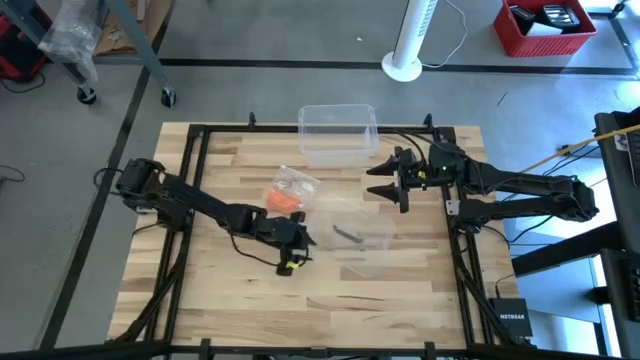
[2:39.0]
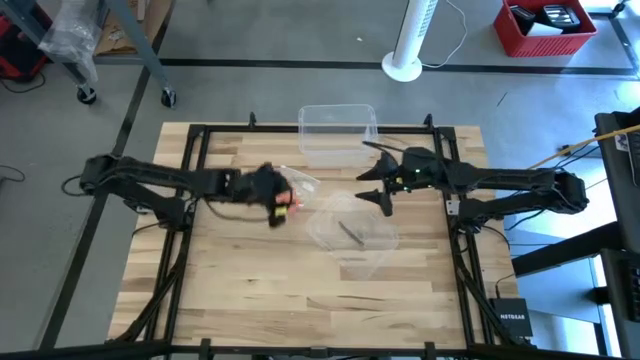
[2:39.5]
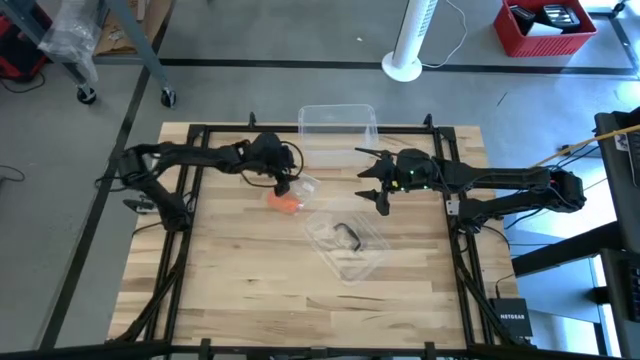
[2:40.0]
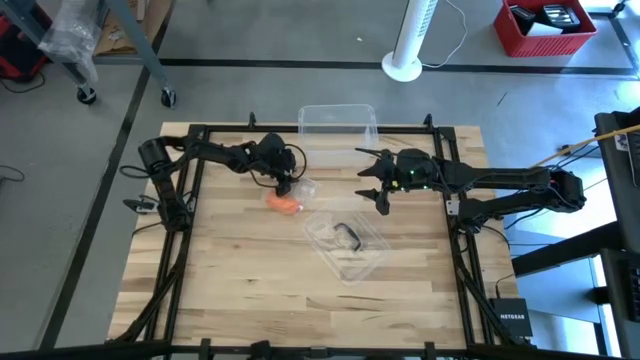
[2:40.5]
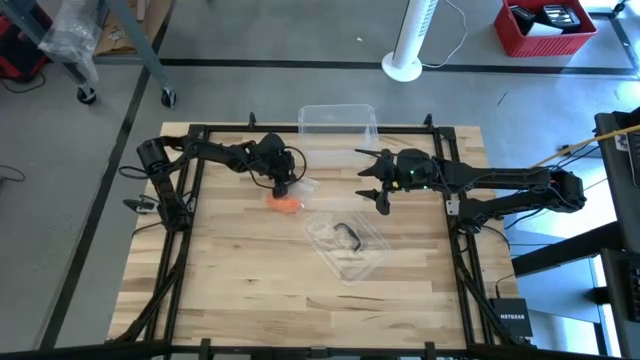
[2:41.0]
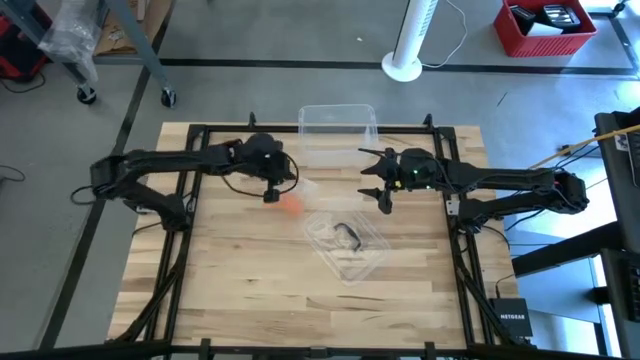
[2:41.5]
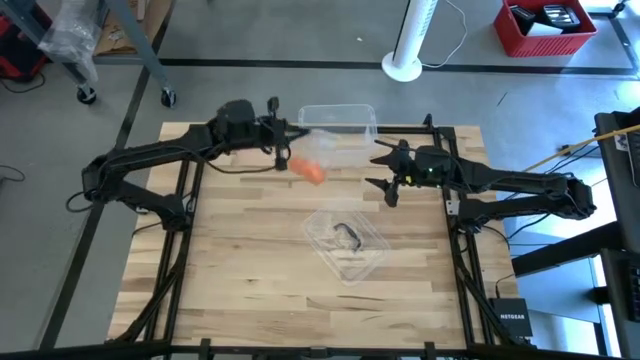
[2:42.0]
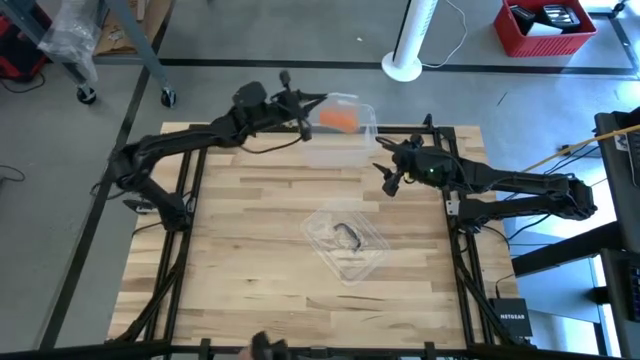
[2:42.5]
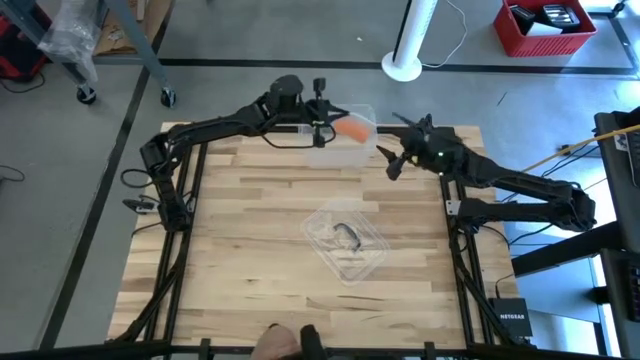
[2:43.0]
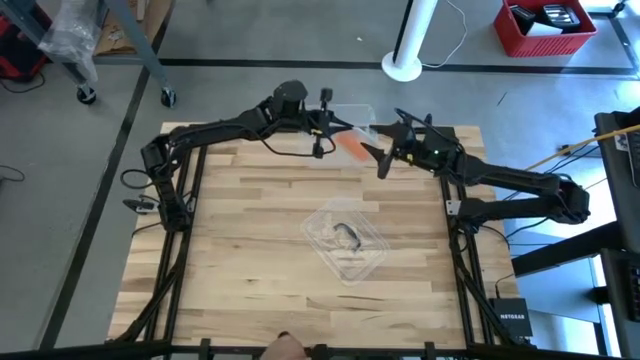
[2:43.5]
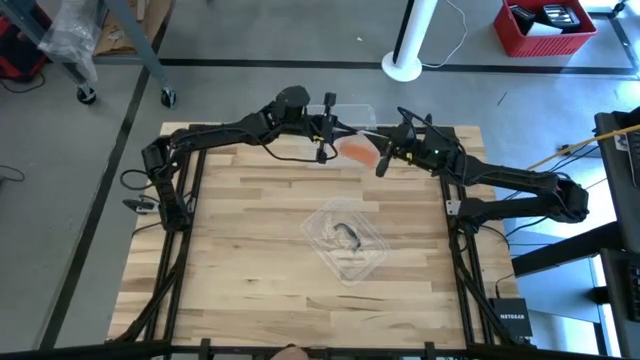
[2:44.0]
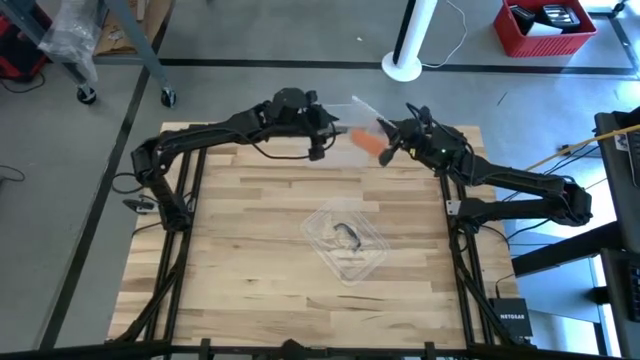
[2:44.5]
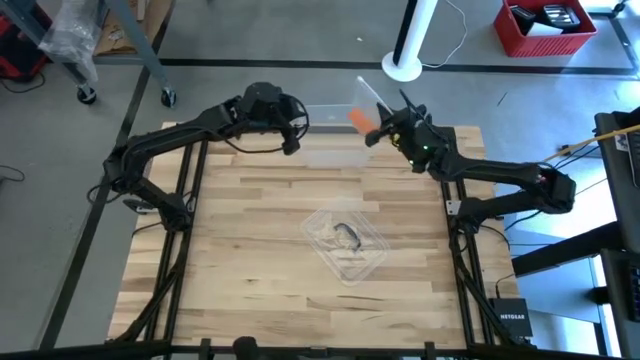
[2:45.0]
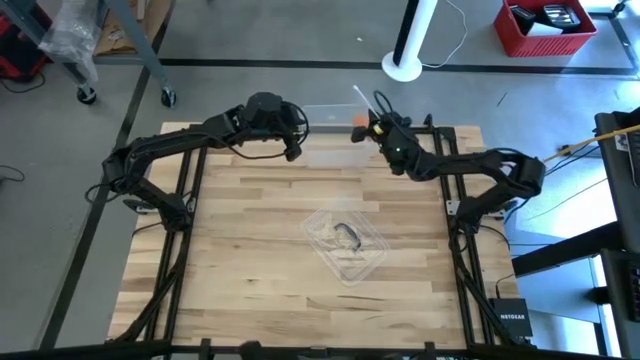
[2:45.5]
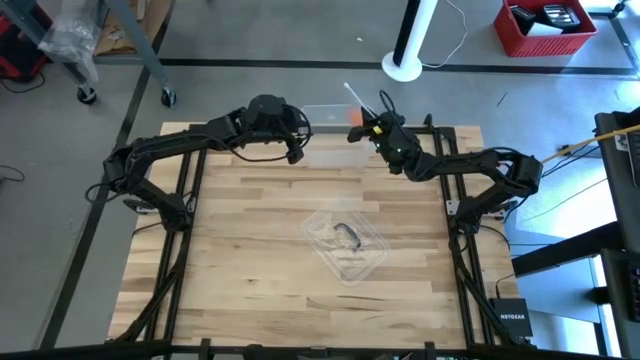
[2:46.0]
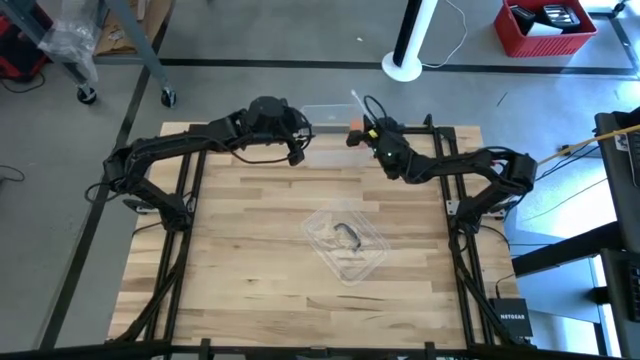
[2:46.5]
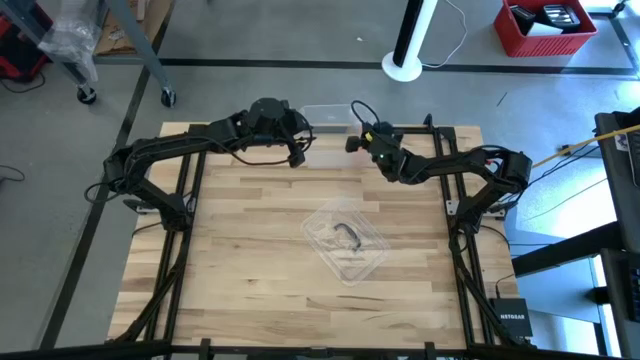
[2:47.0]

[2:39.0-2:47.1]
Task: Roll bandage
Put the packed rolled orange bandage into the transparent bin

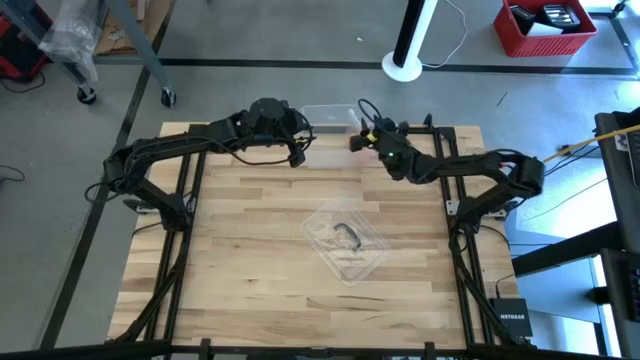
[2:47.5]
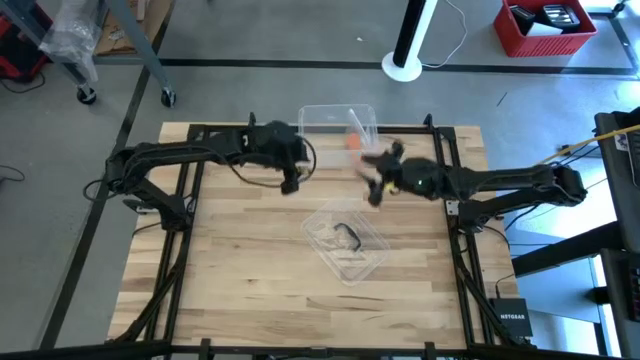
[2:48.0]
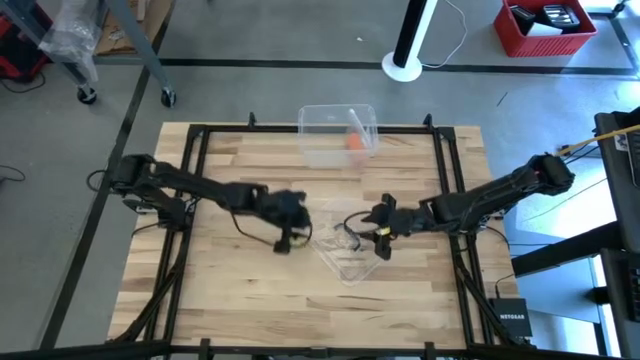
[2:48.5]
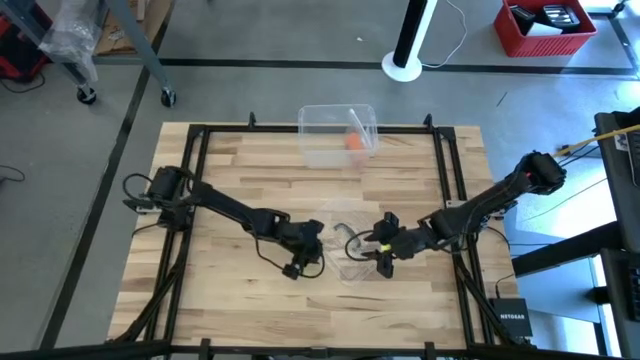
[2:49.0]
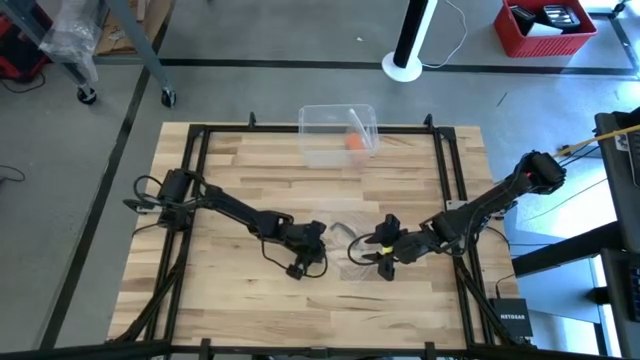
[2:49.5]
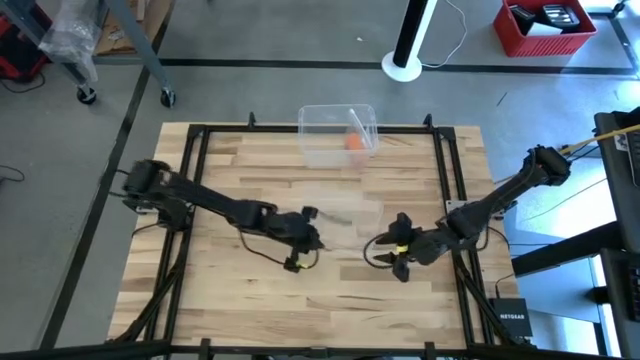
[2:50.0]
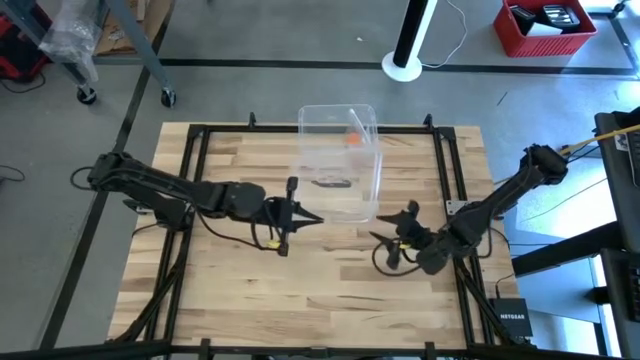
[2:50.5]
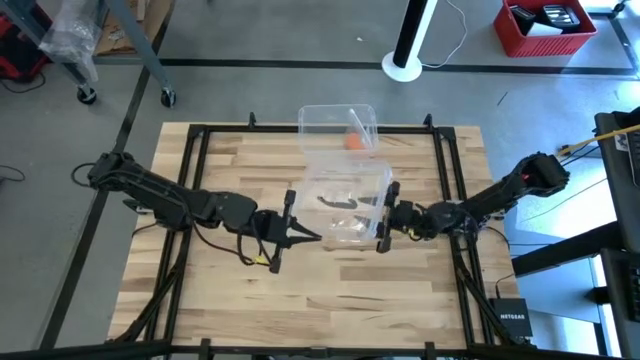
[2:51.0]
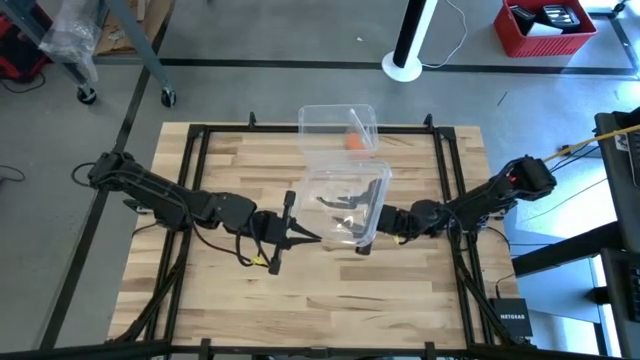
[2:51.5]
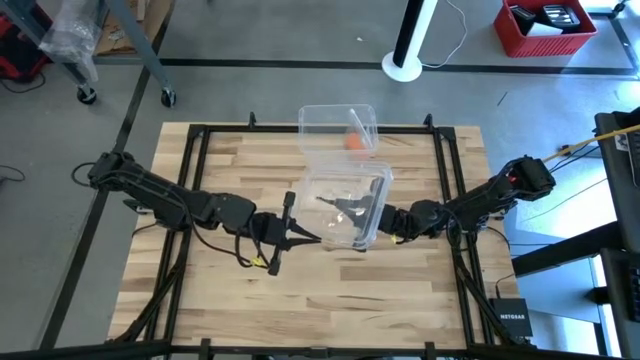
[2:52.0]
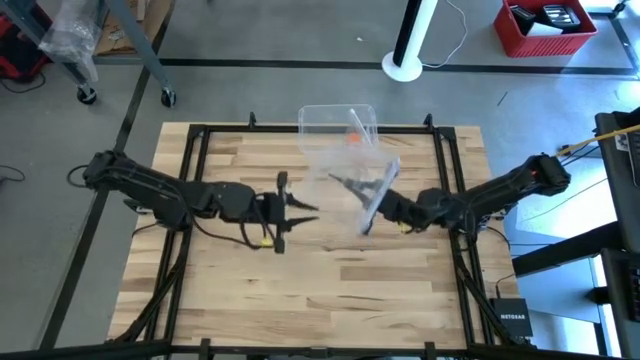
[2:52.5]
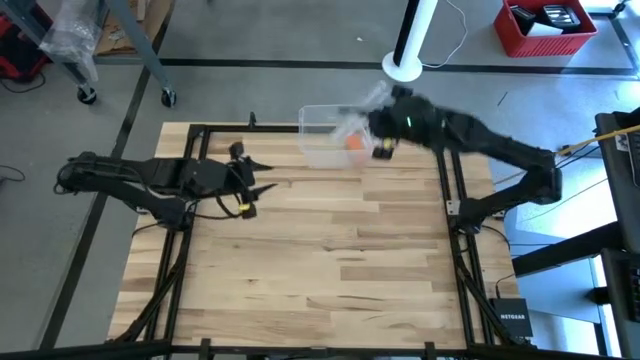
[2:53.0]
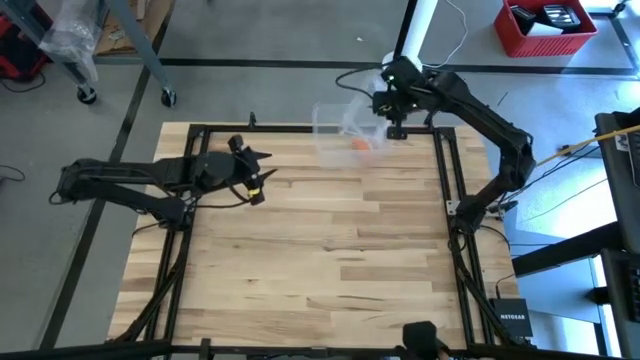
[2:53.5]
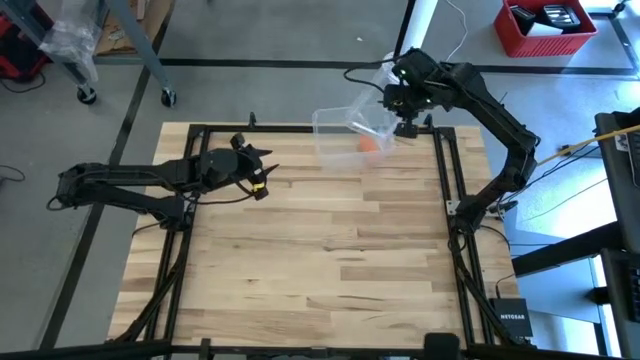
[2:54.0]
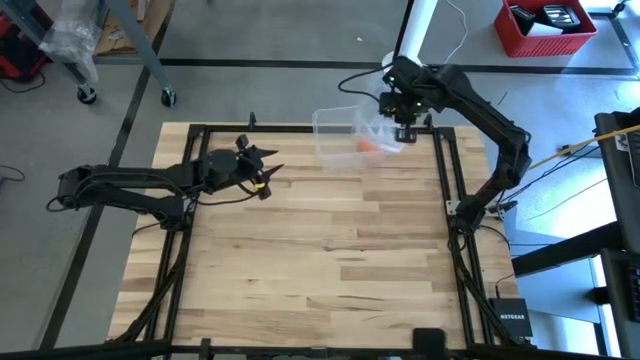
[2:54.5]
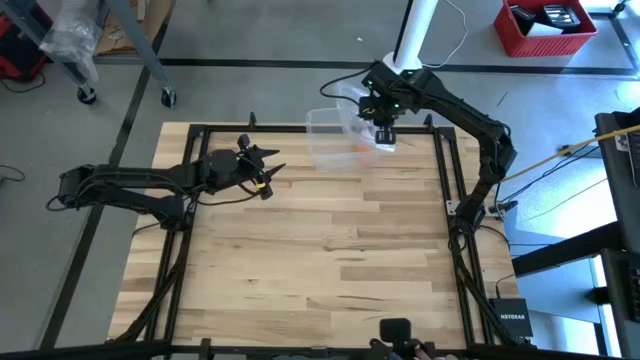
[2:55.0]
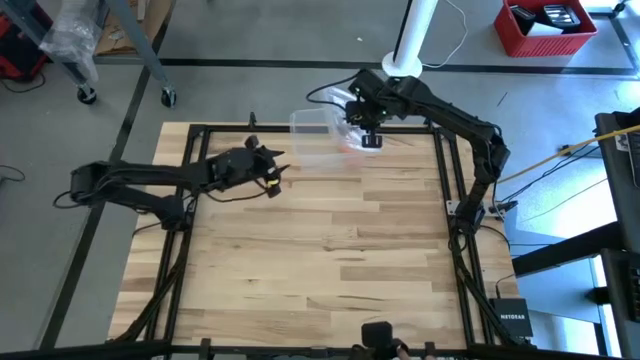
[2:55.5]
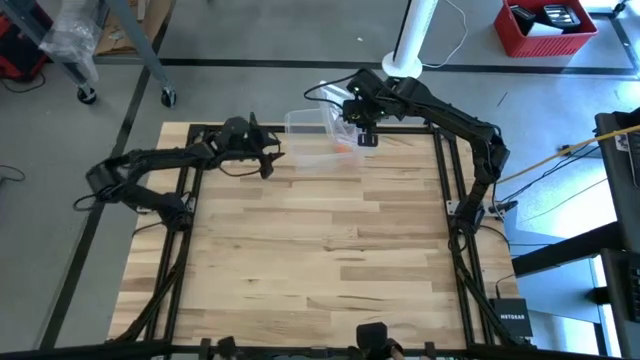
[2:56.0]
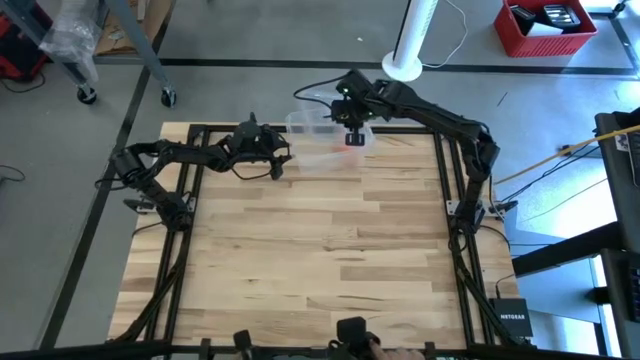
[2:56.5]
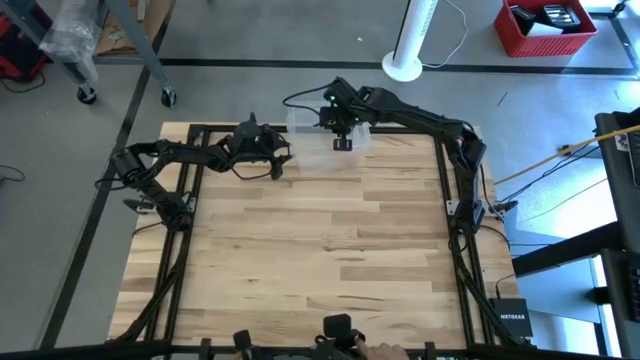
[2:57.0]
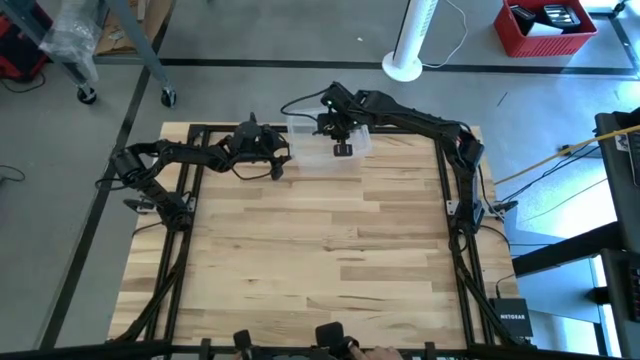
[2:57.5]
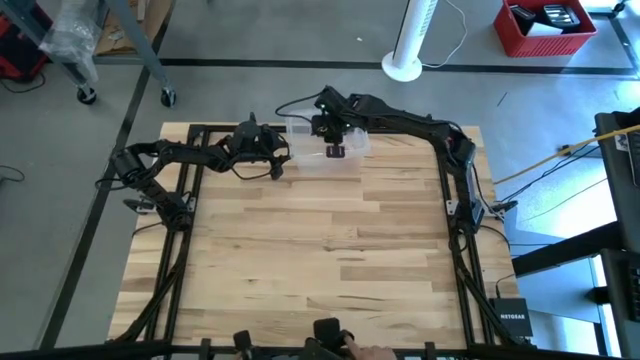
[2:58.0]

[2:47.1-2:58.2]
Close the transparent bin
